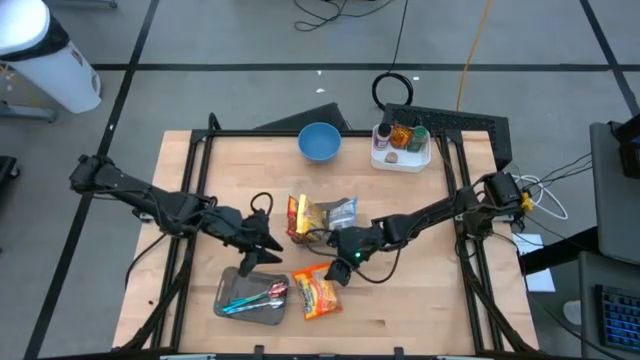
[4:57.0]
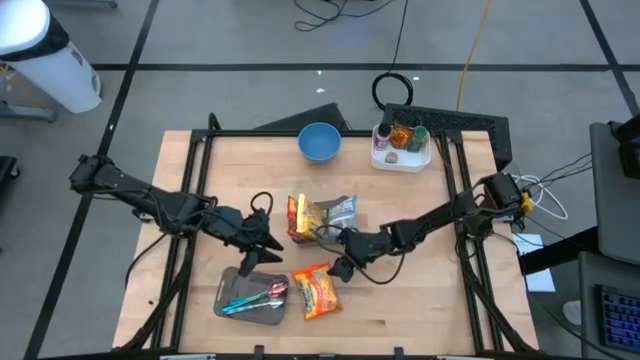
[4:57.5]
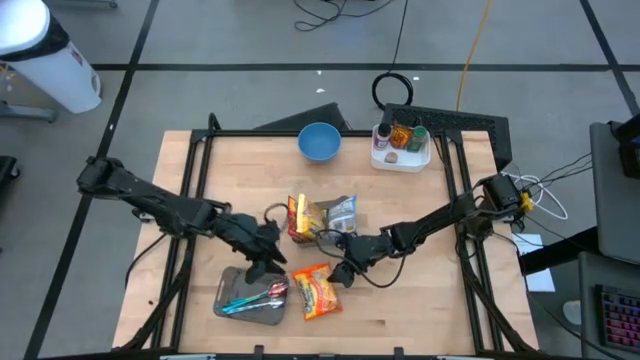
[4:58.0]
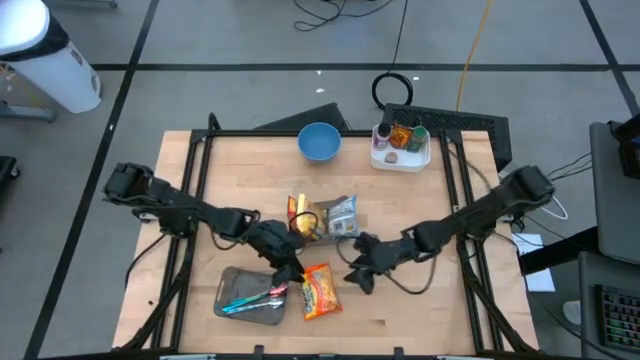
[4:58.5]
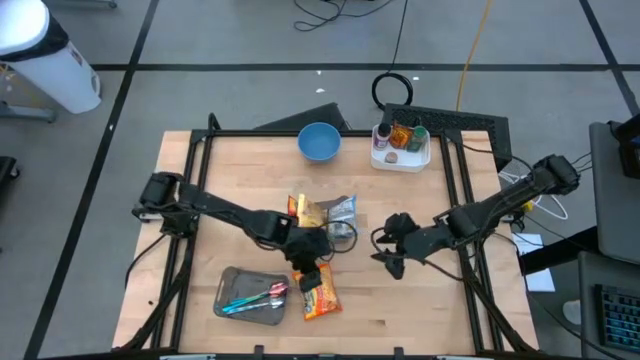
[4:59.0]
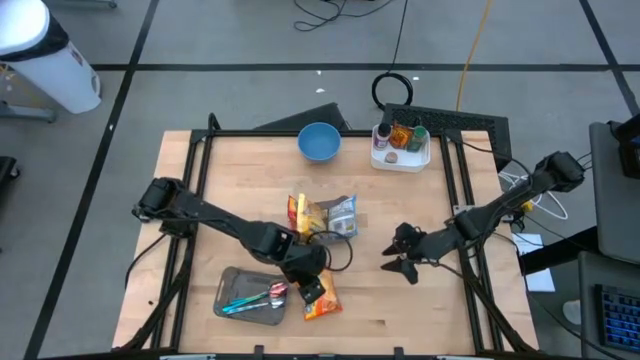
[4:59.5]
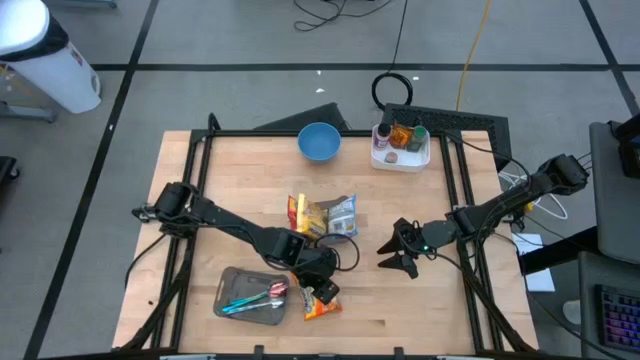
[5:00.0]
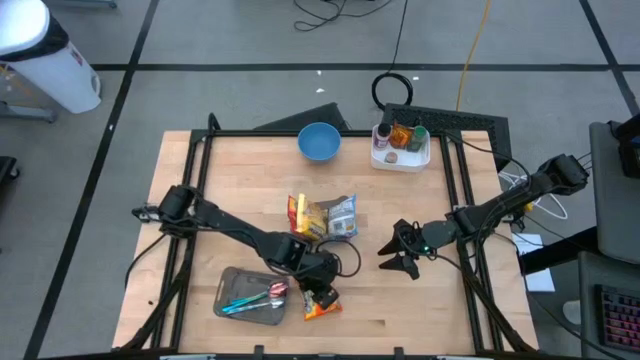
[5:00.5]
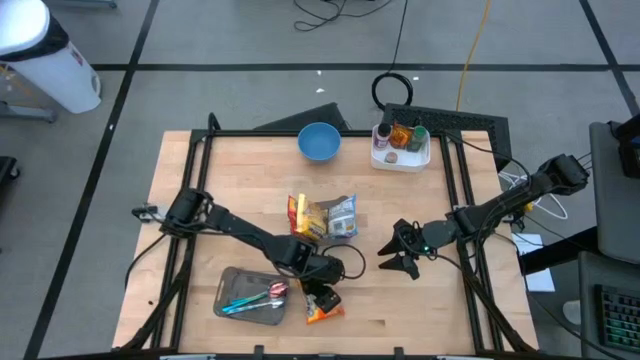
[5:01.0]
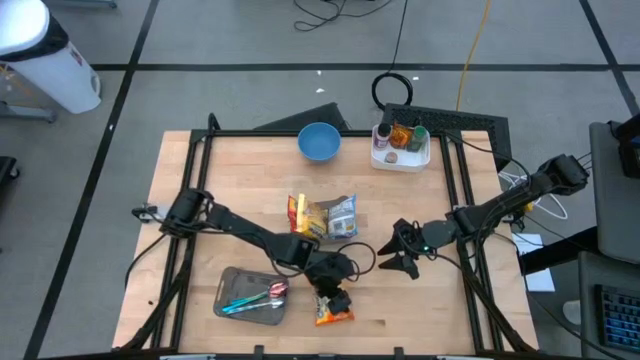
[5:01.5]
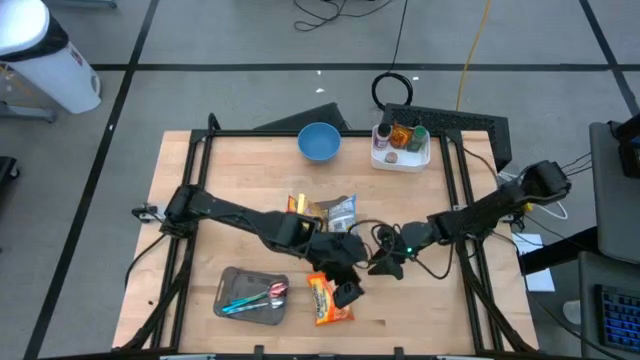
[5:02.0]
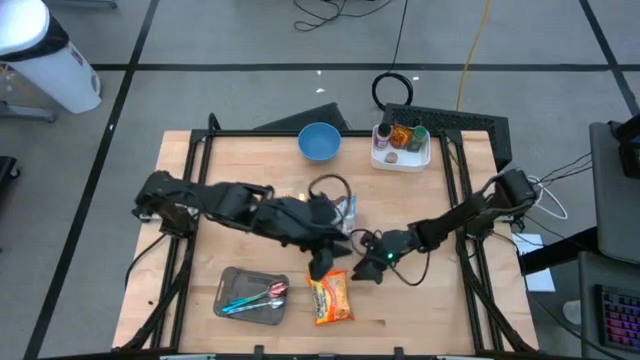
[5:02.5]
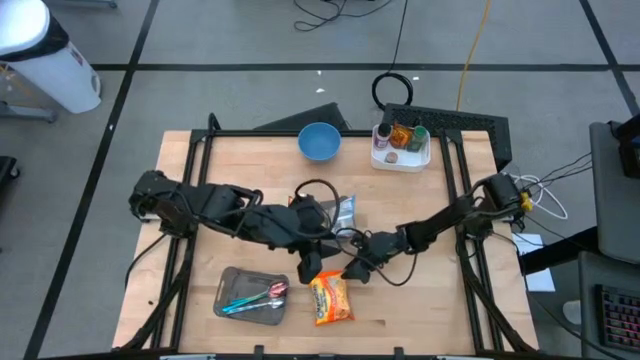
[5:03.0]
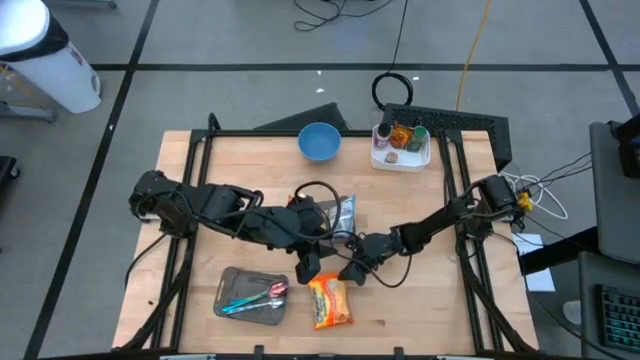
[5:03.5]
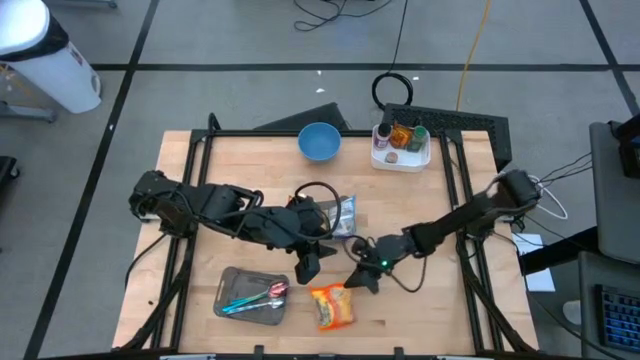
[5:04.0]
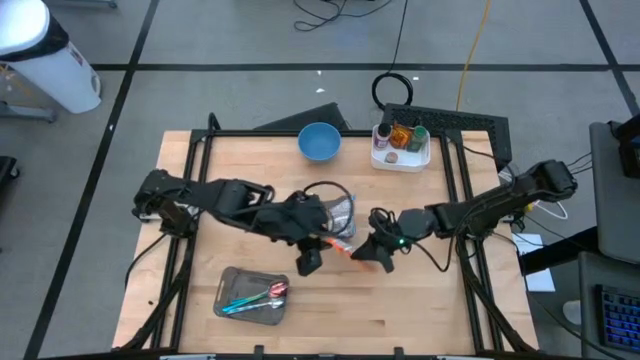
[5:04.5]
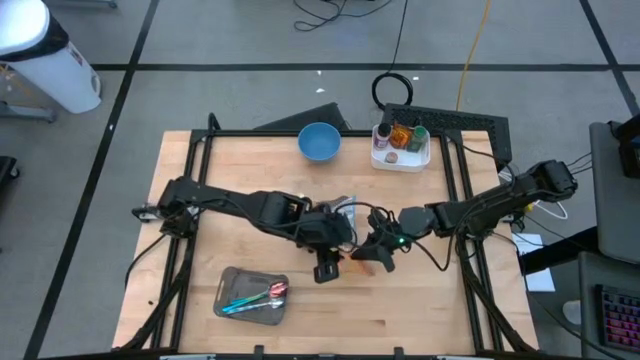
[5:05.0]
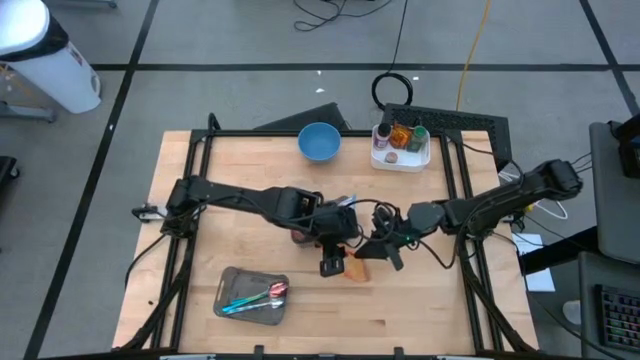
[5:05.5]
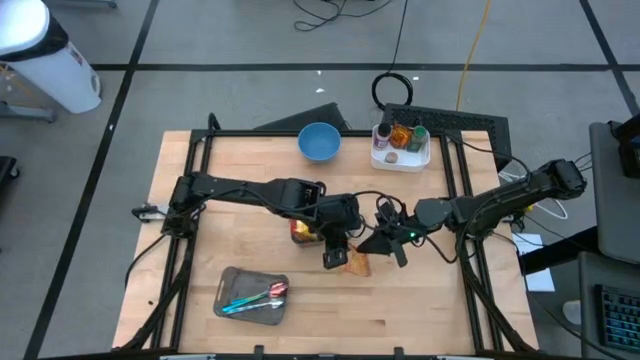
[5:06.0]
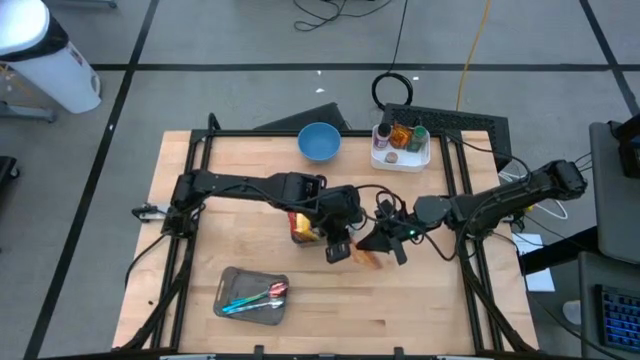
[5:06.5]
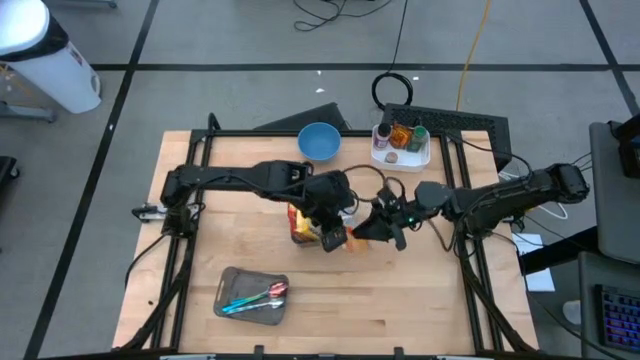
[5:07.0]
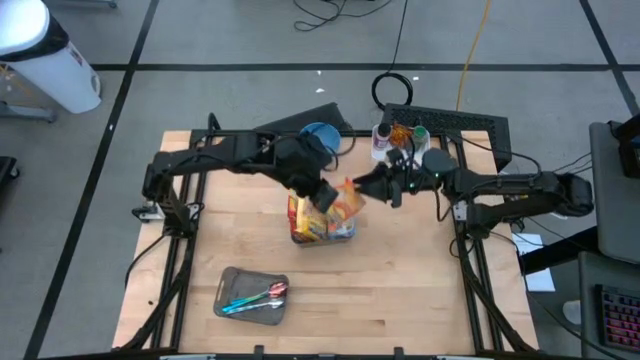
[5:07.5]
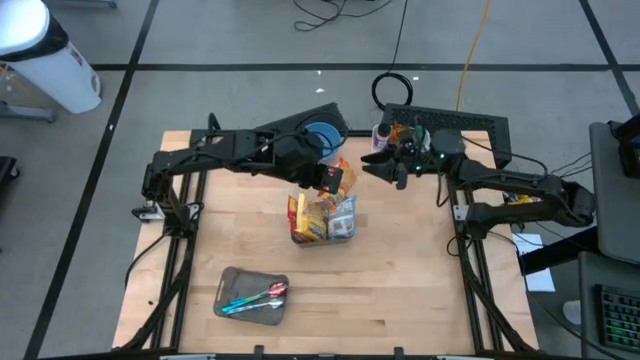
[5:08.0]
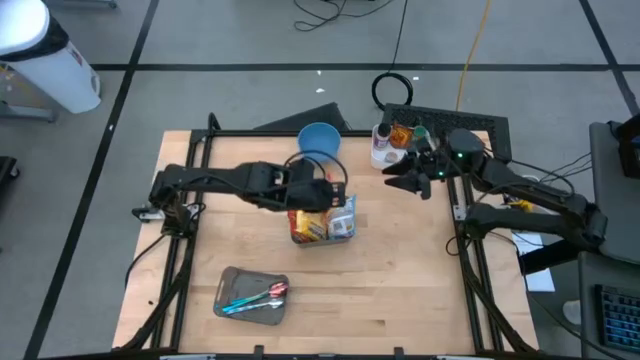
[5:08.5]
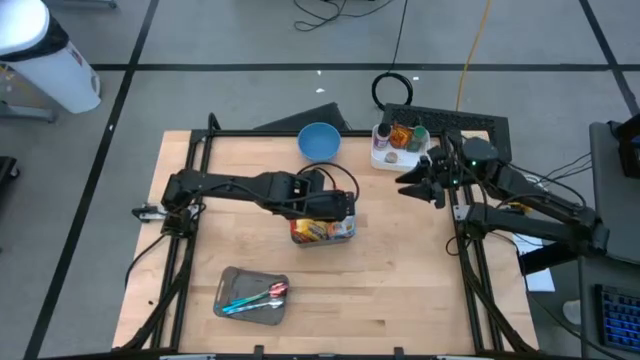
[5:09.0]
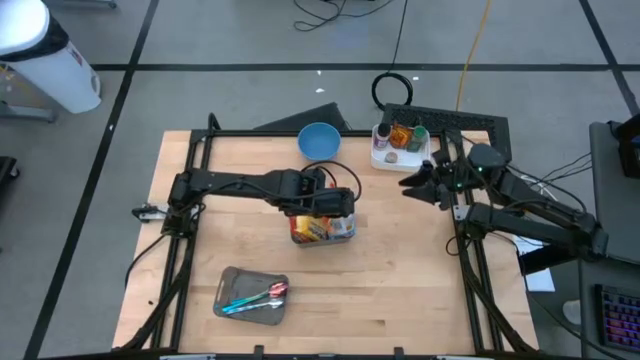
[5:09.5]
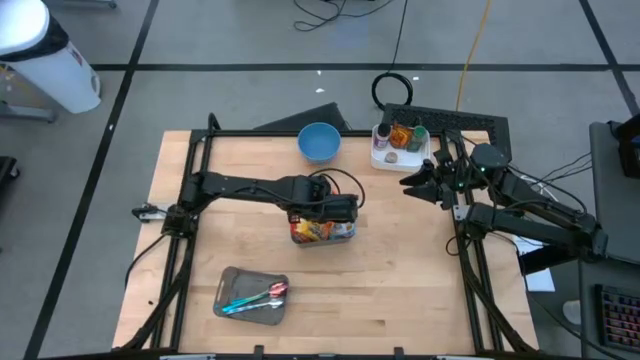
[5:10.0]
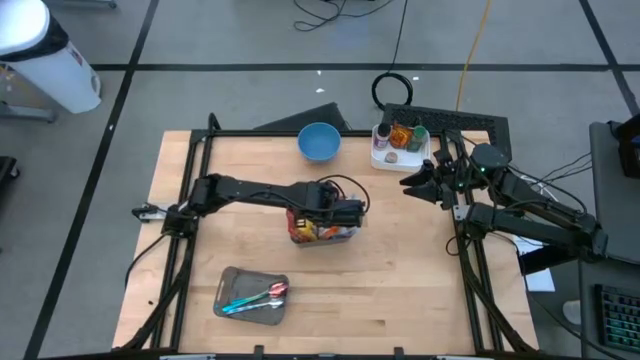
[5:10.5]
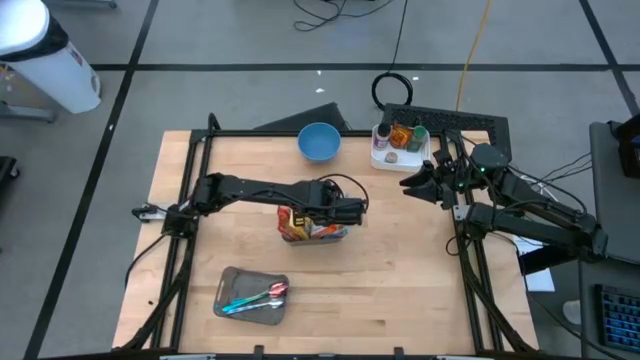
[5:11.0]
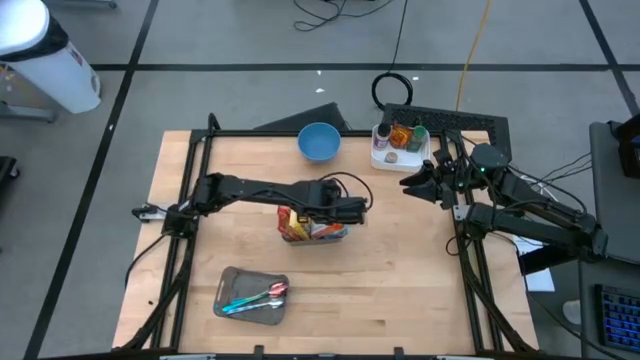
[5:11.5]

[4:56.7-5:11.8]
Task: Pick & Place Food Item
Put the orange noodle pack into the top black bin

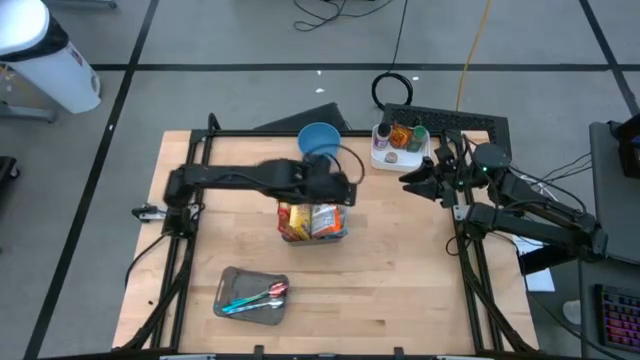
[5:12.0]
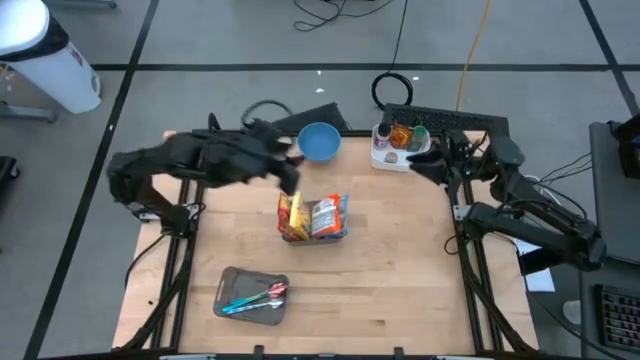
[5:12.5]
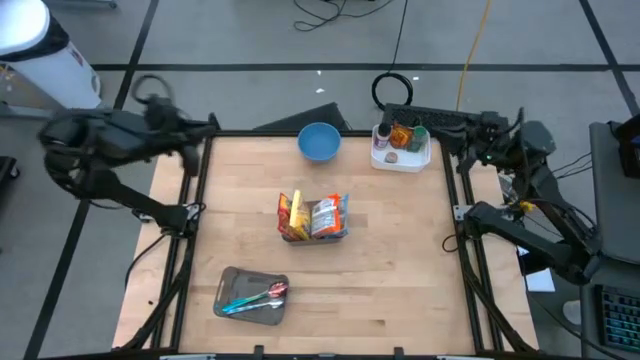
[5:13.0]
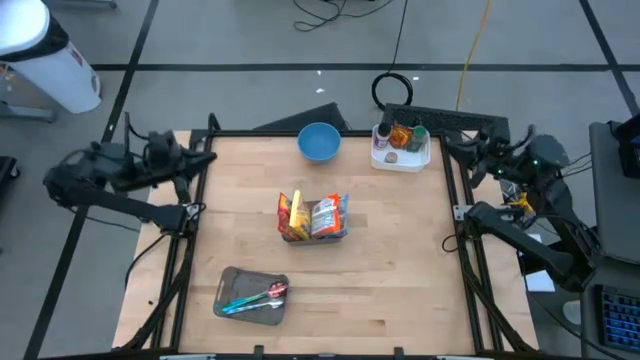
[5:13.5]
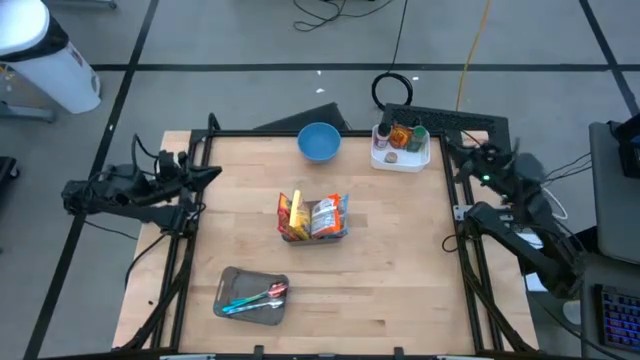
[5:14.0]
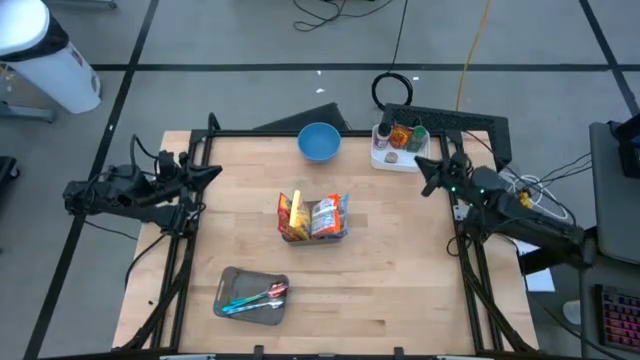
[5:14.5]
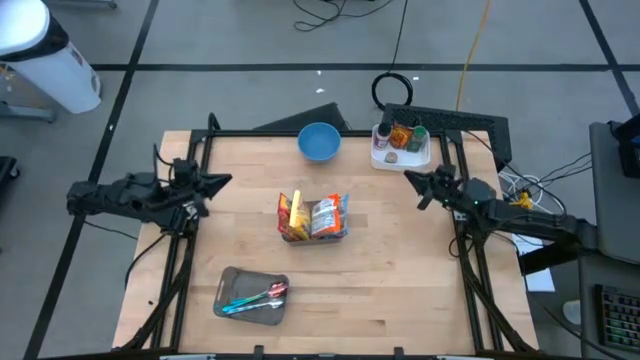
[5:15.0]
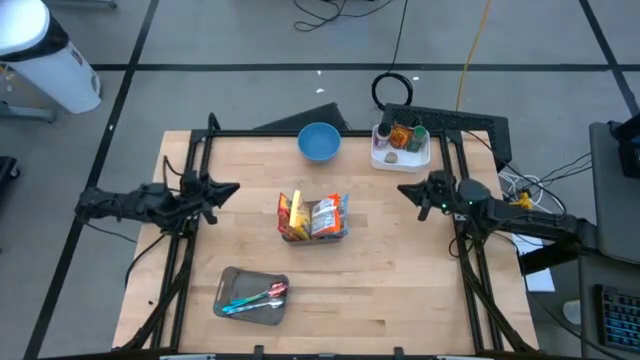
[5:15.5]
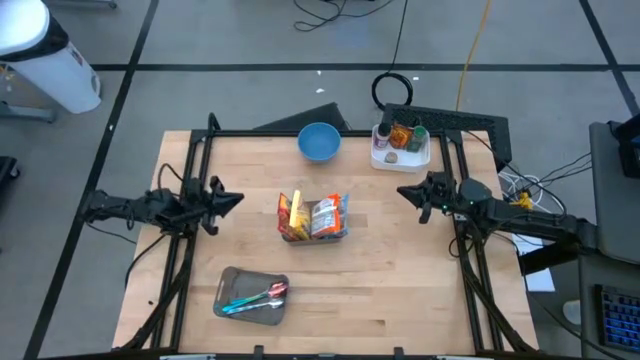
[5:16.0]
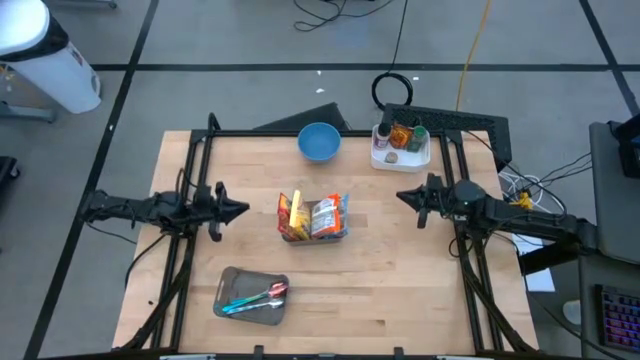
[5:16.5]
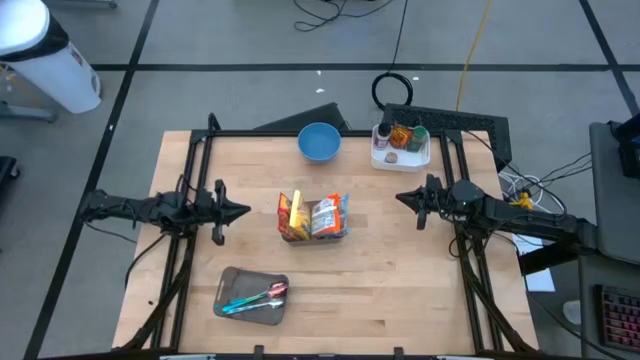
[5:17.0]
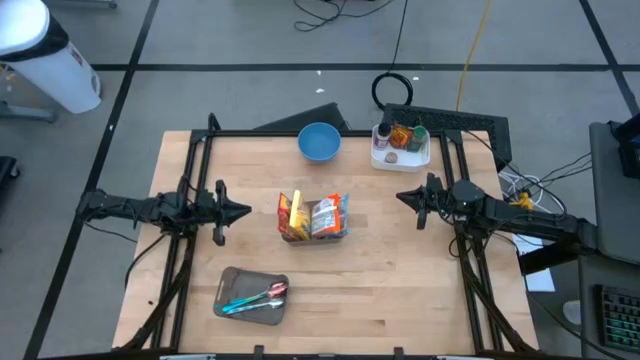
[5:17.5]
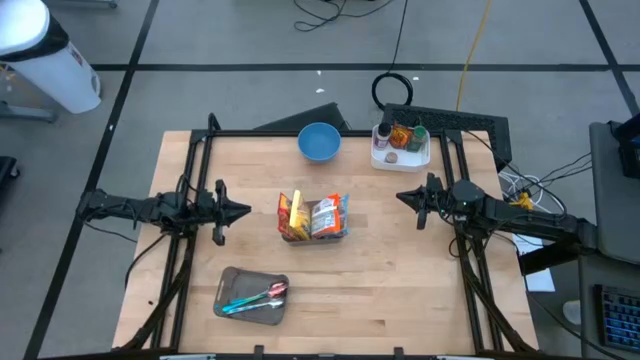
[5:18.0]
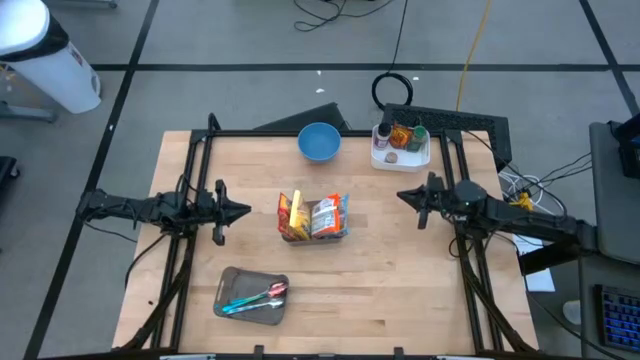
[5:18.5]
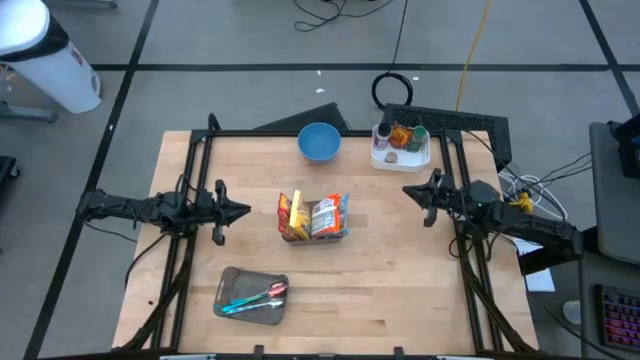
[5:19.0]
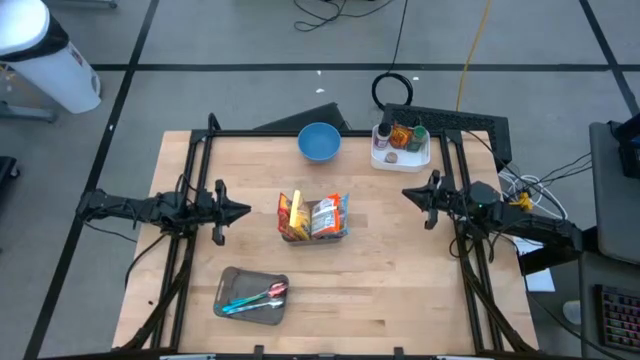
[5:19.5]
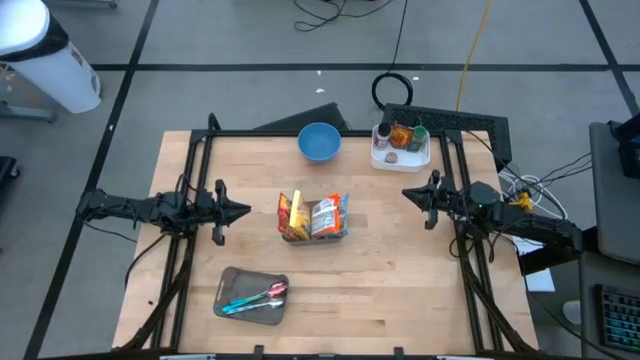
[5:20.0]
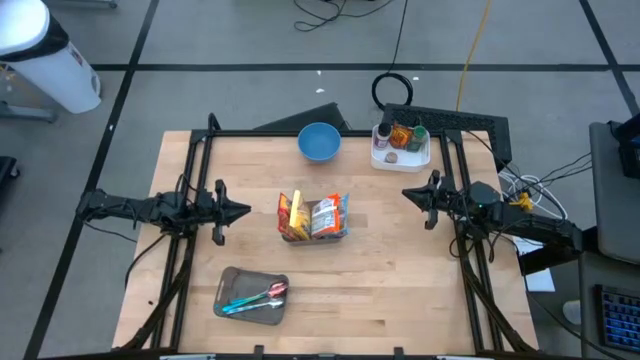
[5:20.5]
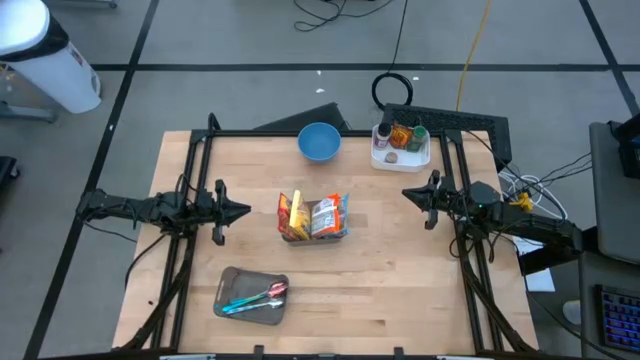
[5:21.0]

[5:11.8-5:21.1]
Return to Home Position
